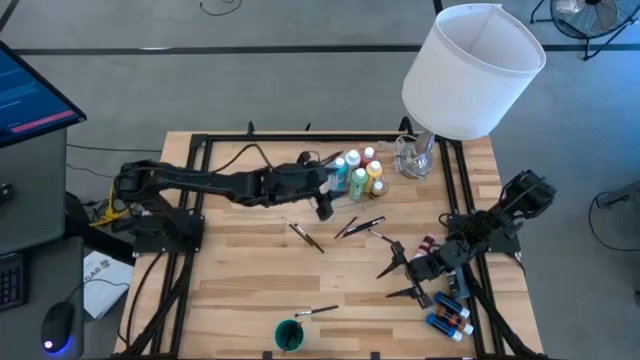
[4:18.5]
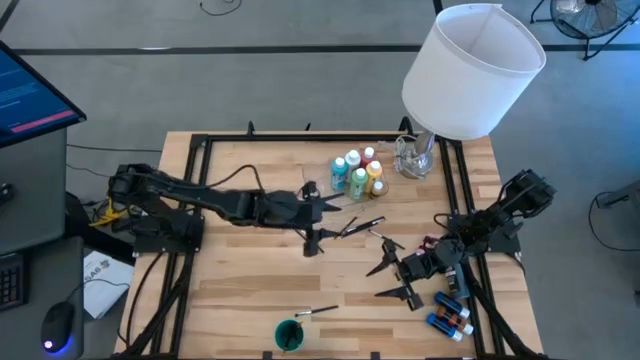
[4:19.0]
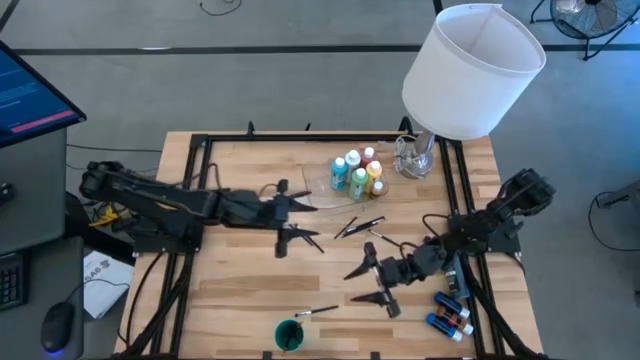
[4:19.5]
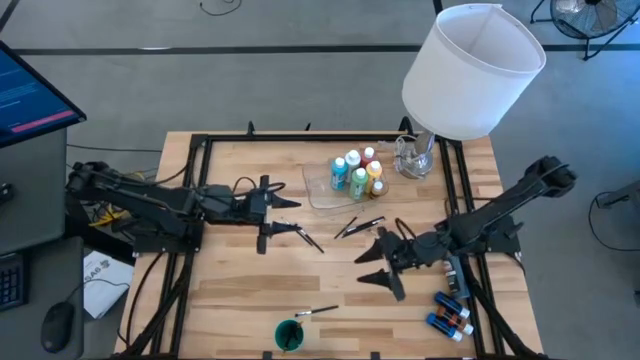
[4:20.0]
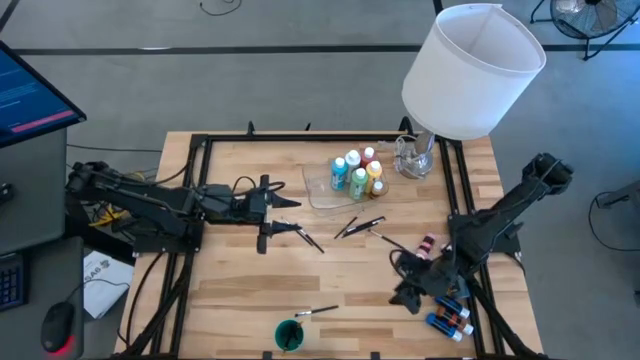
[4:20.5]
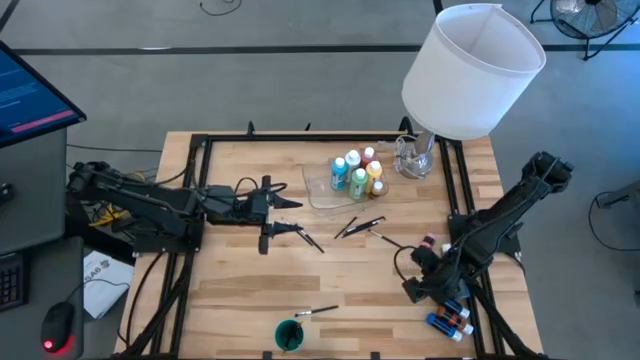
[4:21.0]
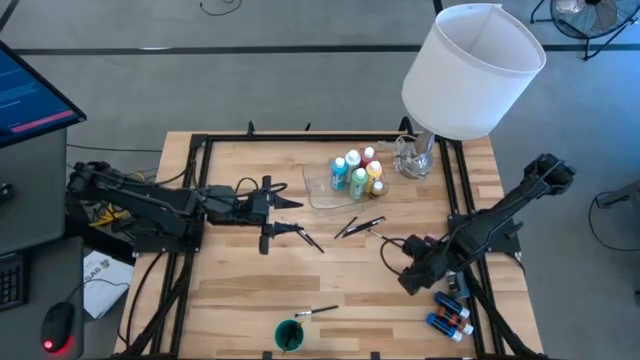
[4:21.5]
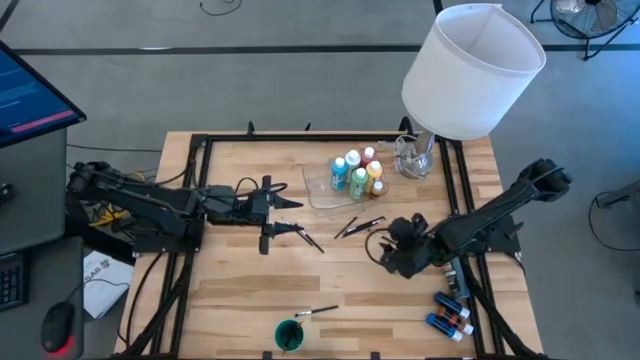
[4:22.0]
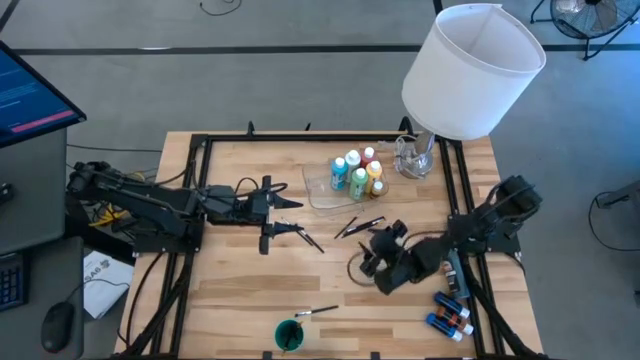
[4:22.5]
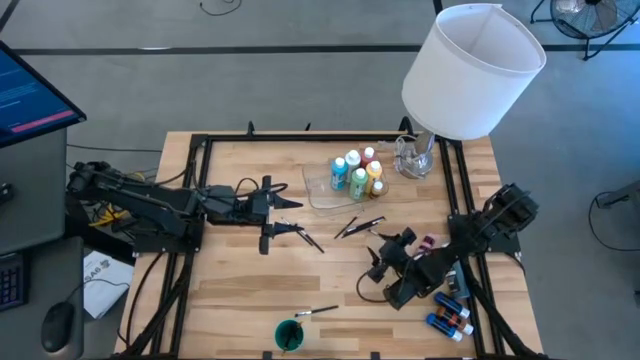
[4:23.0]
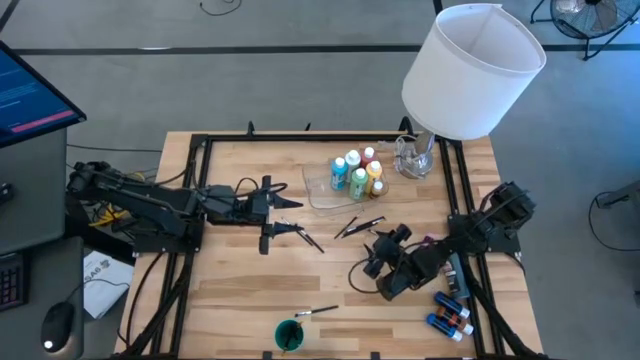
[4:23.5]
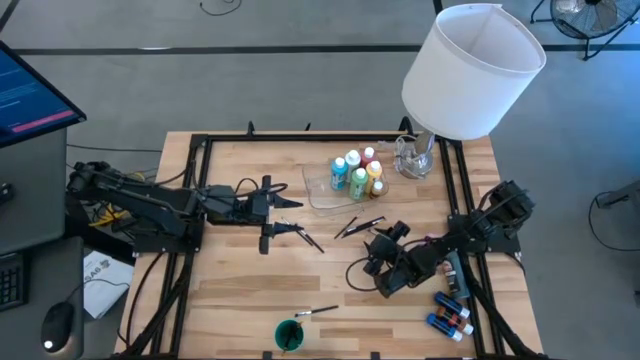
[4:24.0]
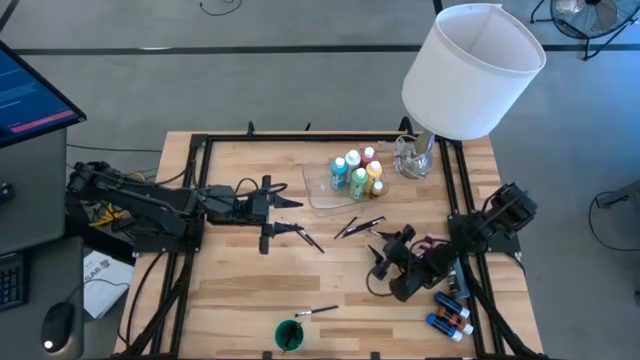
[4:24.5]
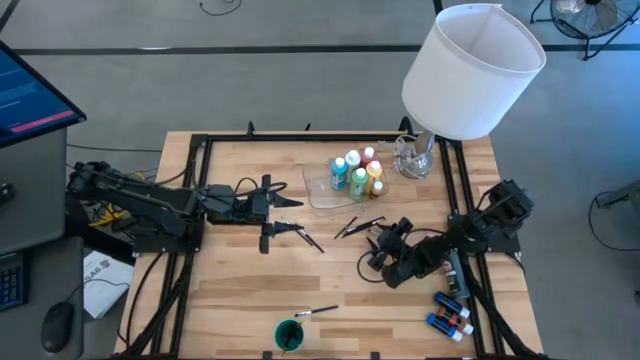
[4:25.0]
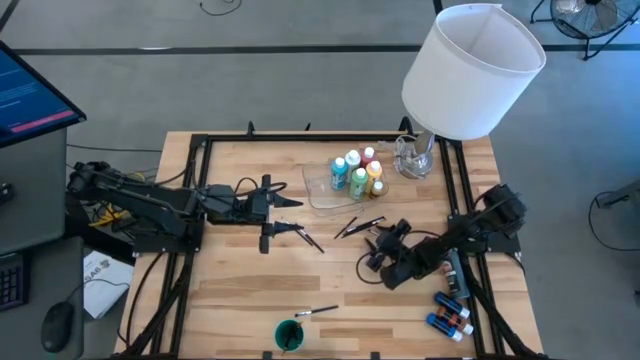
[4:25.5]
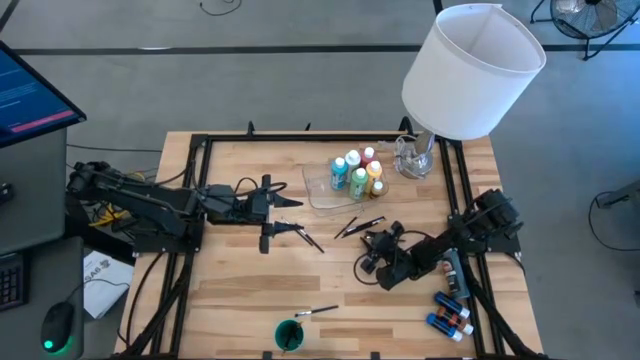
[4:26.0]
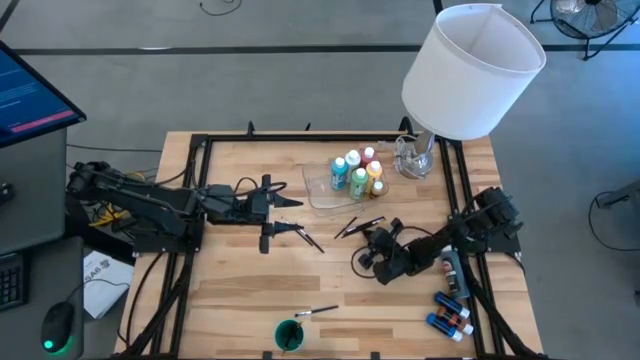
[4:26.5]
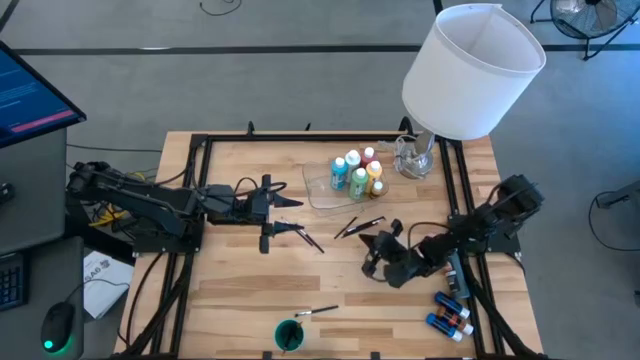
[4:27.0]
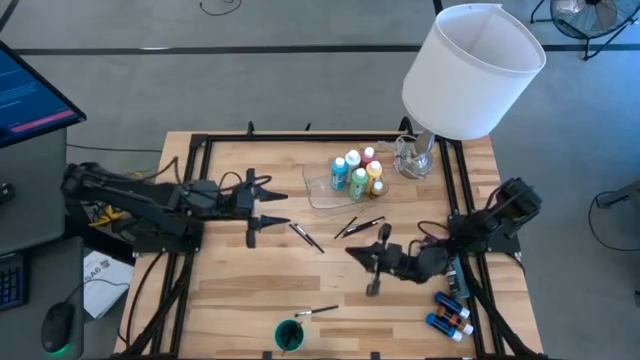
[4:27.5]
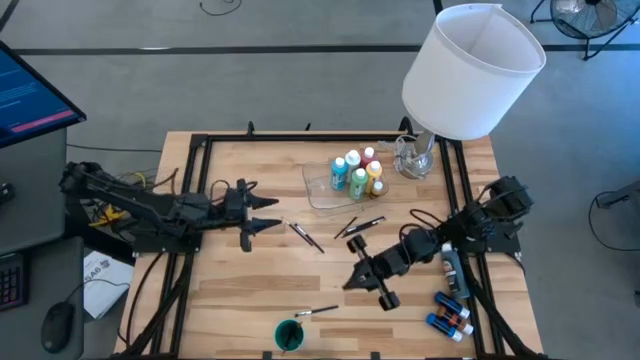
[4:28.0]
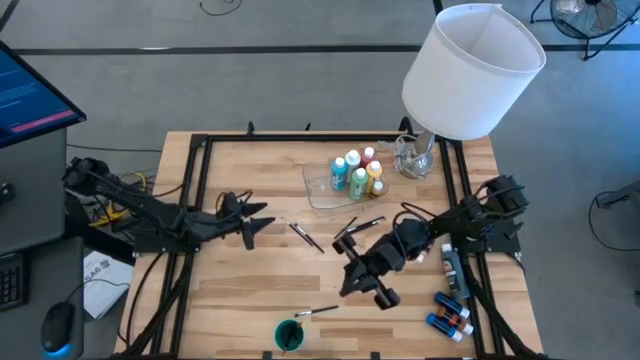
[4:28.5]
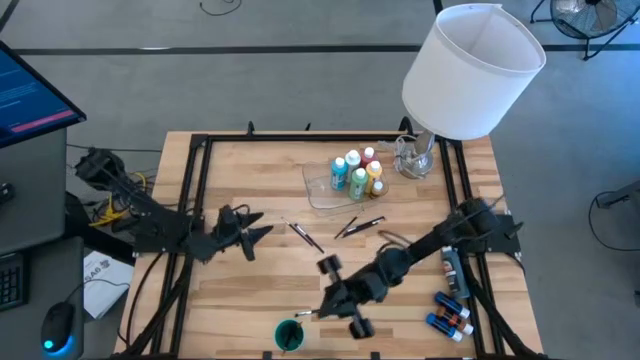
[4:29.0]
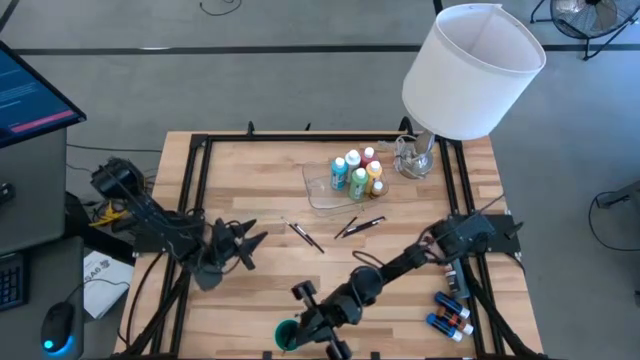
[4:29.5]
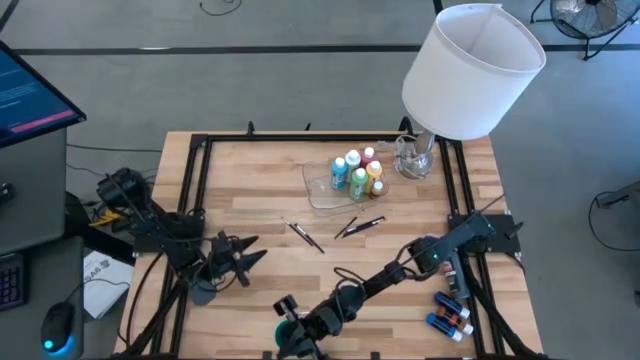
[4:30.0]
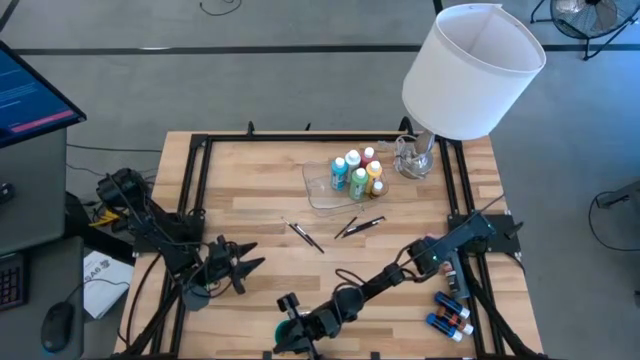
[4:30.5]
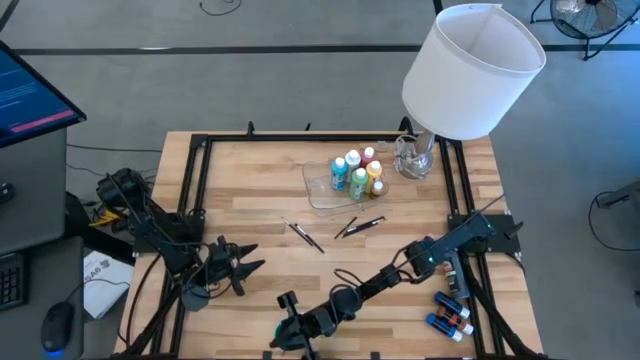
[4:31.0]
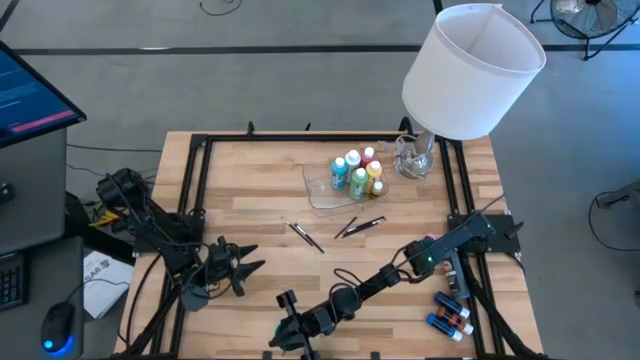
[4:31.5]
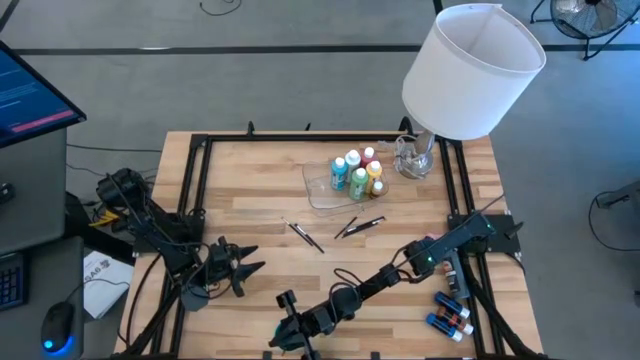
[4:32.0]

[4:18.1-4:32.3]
Task: Pick & Place Paint Supplies
Put the silver paintbrush into the green cup
